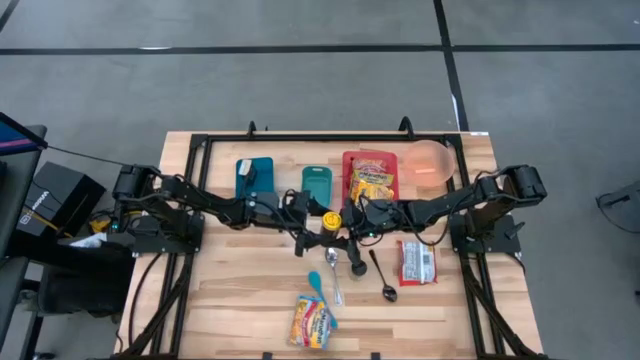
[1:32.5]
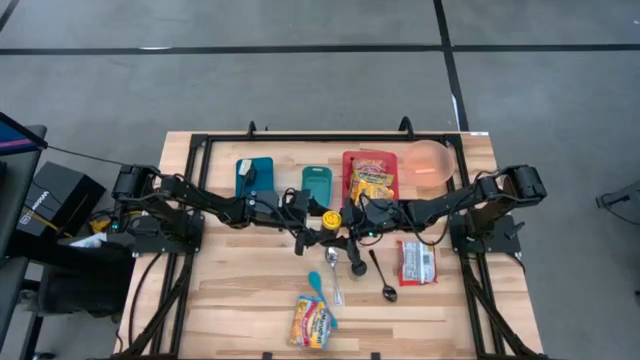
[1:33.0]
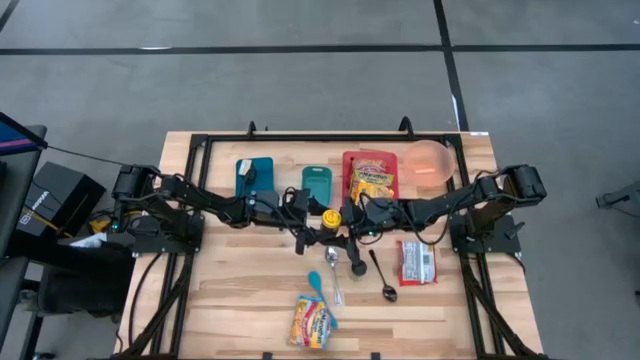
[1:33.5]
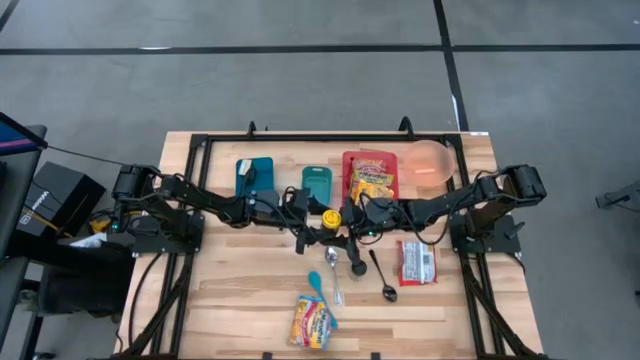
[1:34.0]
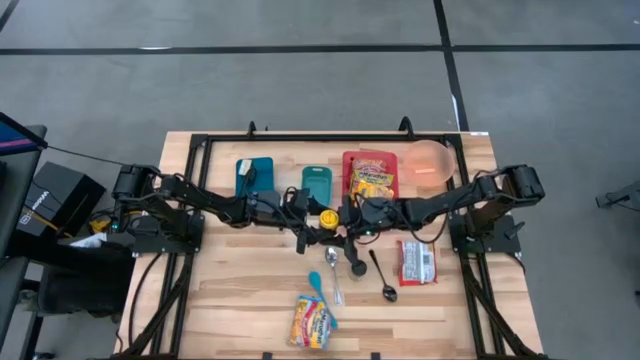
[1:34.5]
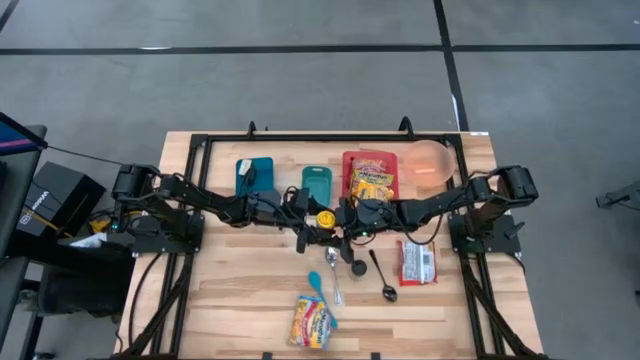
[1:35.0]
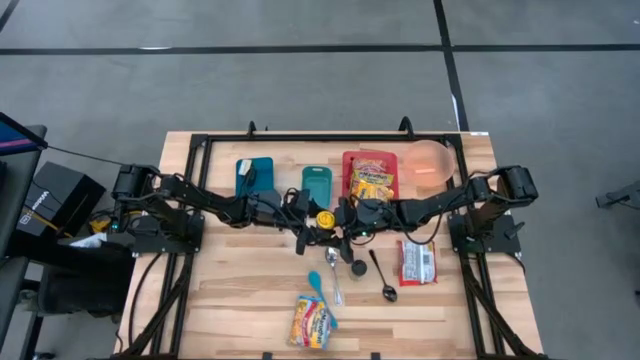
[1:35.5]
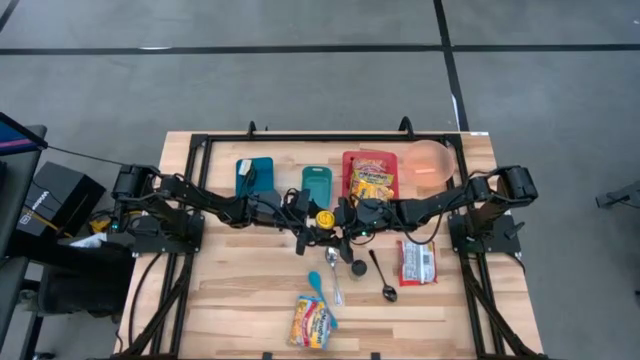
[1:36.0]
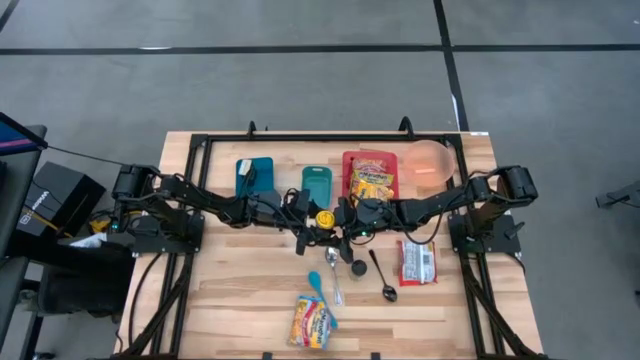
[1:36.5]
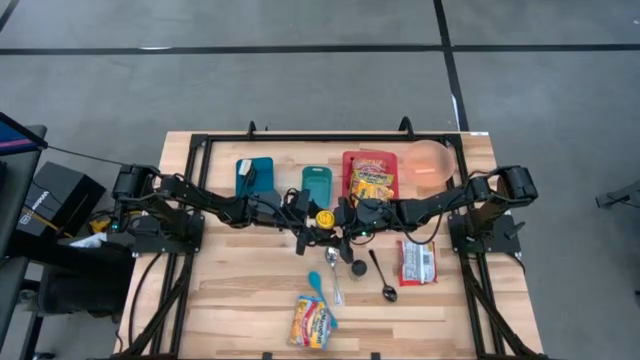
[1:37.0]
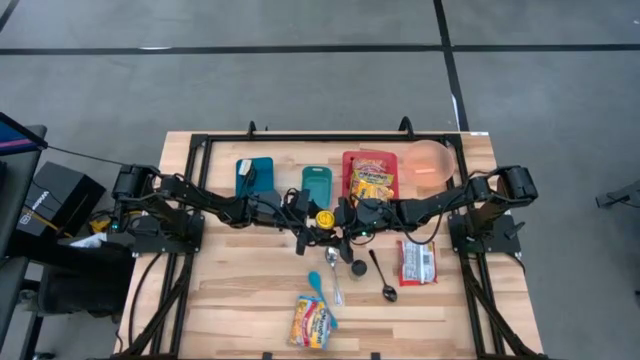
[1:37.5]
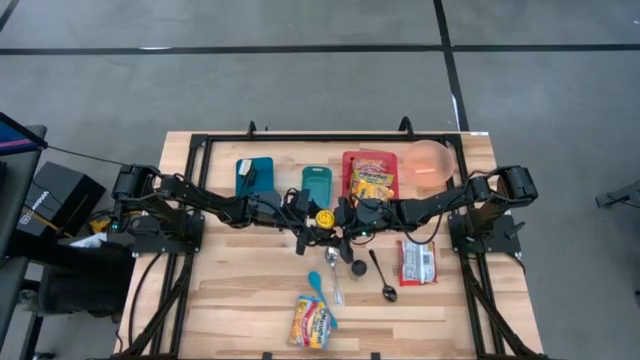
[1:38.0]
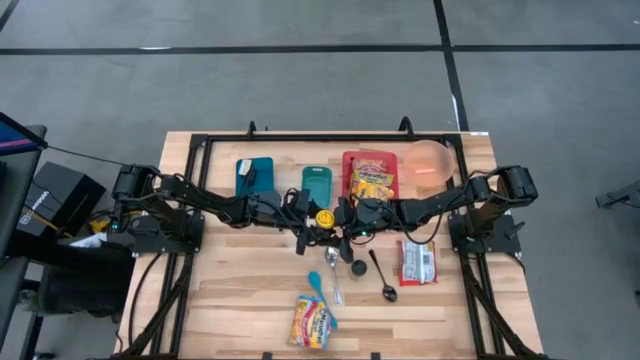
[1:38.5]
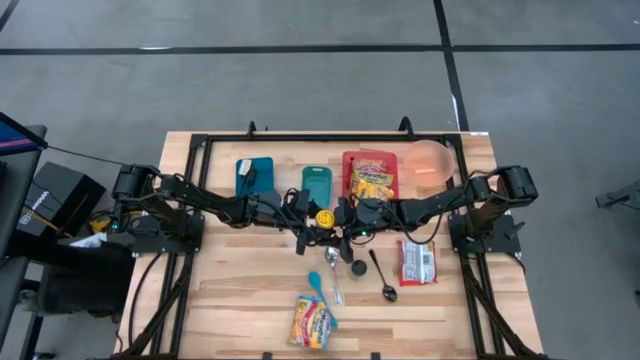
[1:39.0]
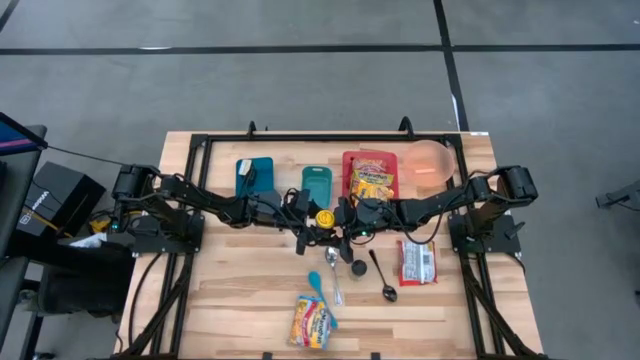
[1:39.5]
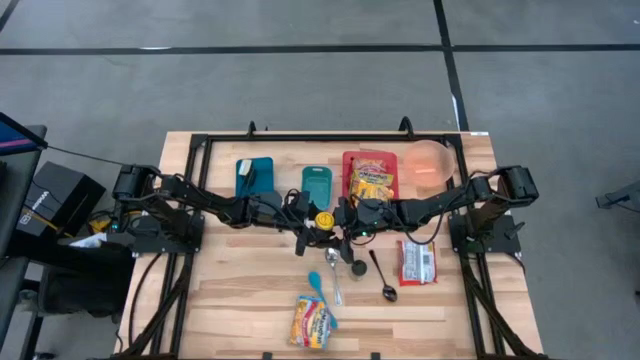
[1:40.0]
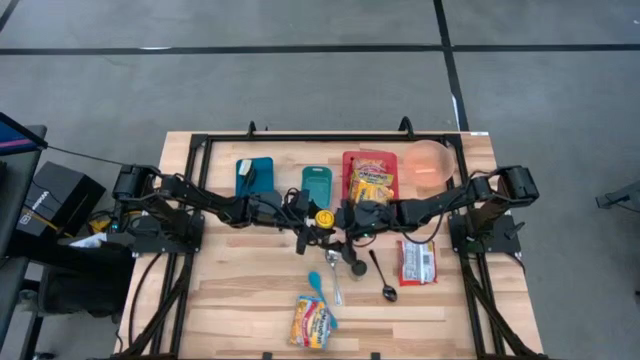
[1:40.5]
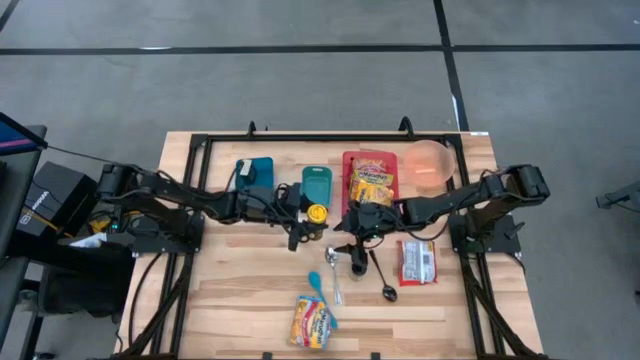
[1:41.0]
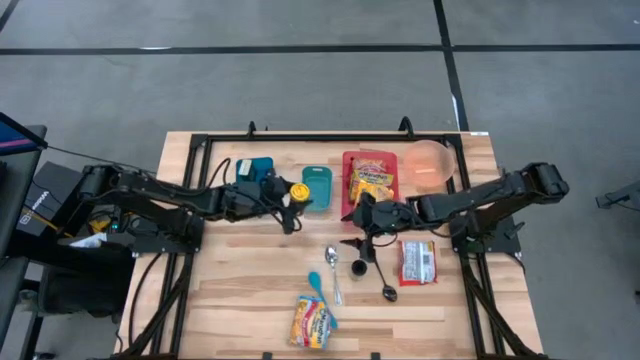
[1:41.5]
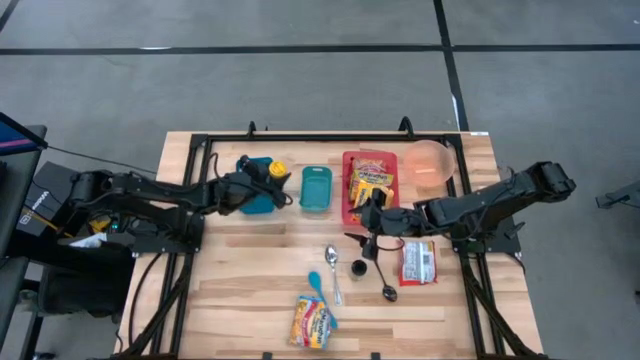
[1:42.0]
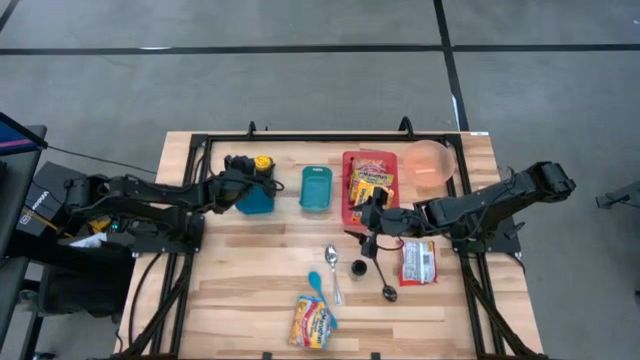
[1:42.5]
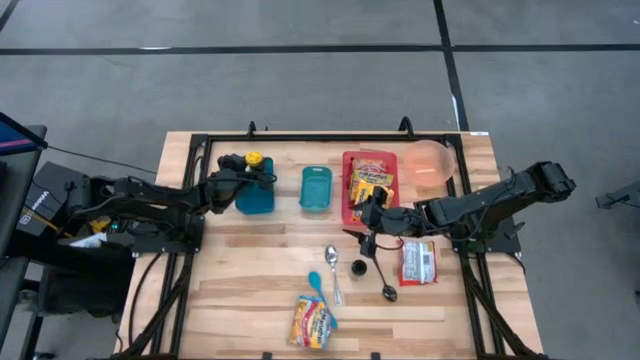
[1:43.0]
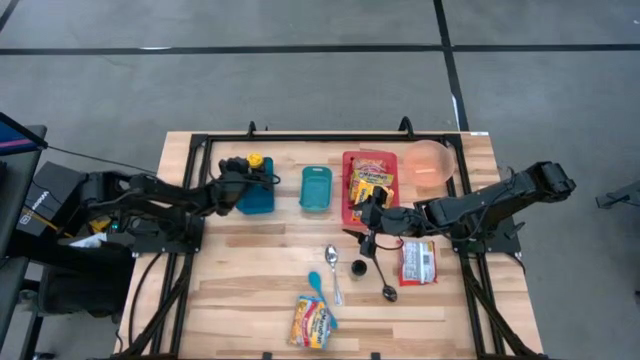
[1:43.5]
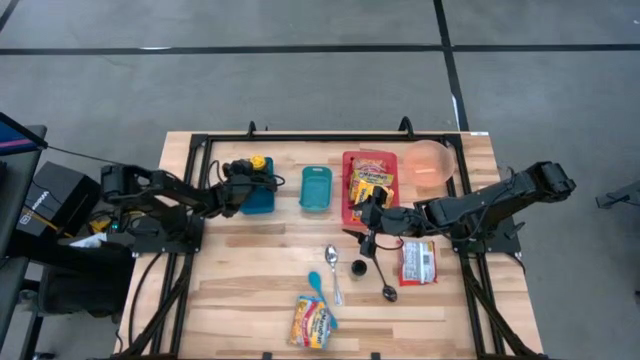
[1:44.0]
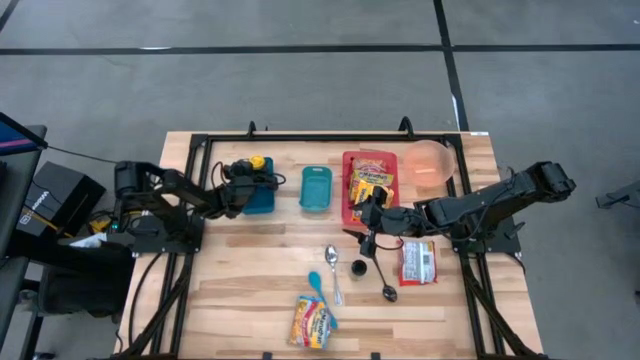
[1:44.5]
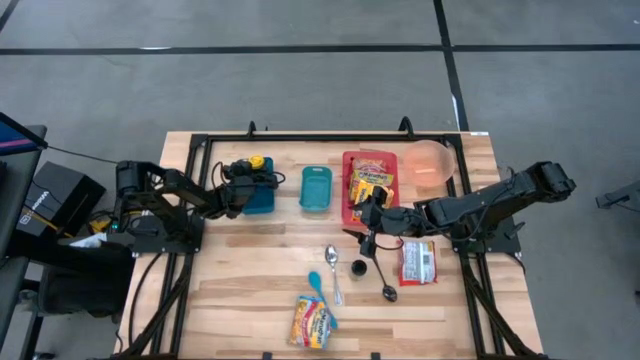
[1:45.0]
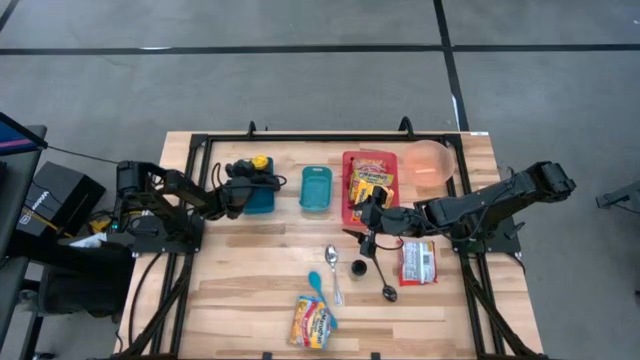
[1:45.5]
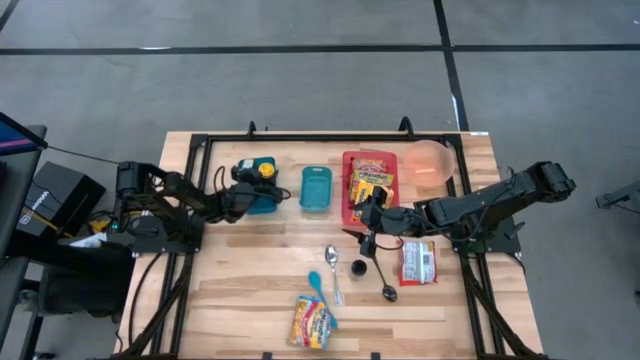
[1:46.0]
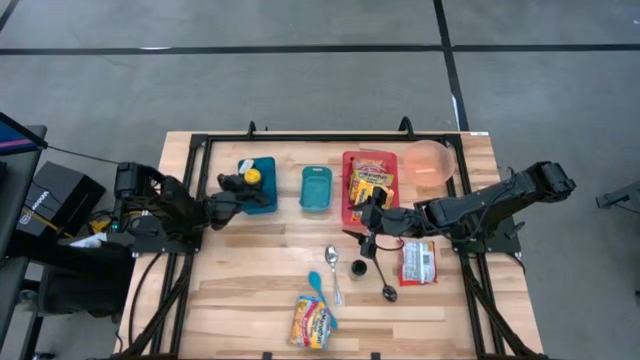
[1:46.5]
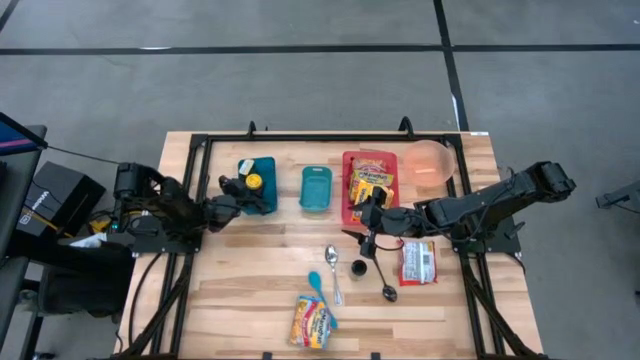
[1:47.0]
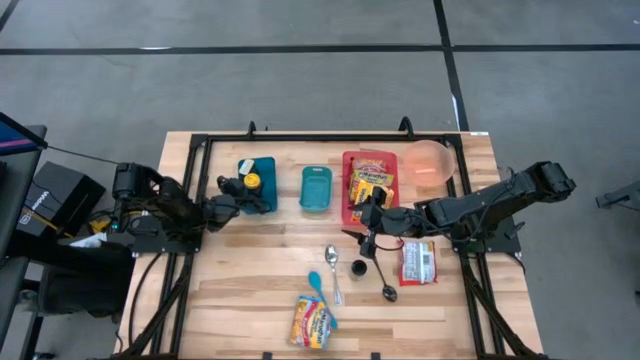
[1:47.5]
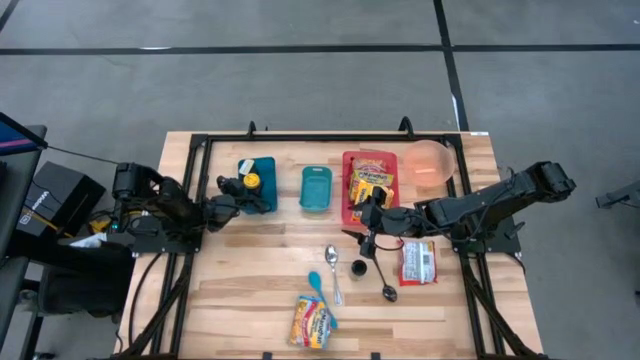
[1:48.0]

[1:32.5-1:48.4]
Task: Pick & Place Food Item
Put the yellow spice bottle into the blue bin
